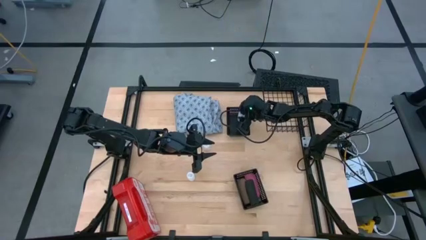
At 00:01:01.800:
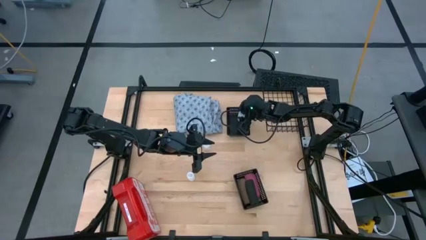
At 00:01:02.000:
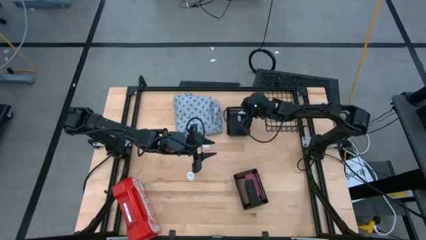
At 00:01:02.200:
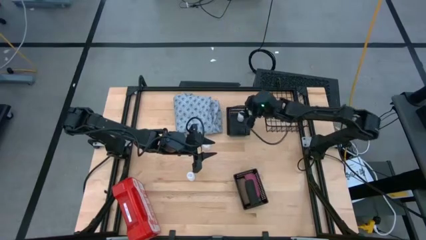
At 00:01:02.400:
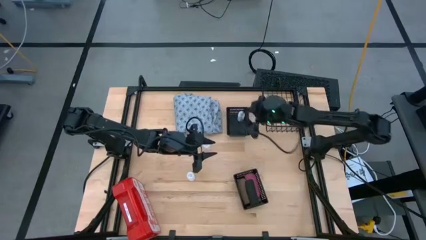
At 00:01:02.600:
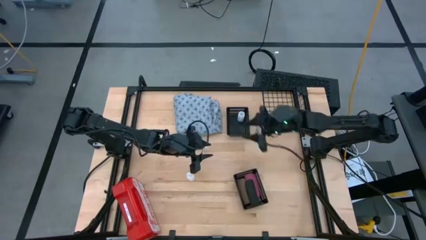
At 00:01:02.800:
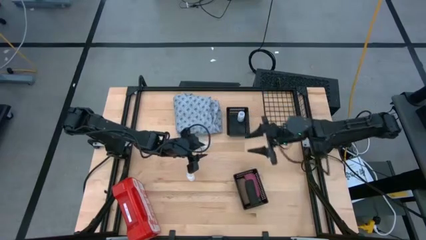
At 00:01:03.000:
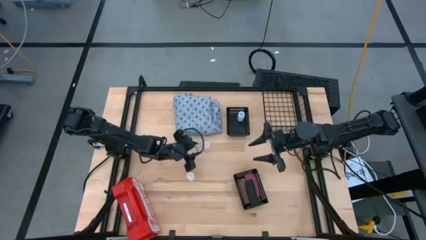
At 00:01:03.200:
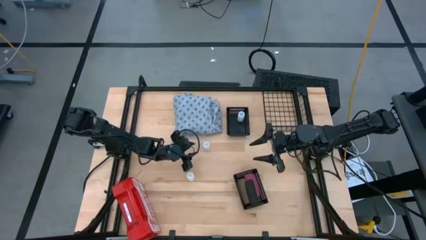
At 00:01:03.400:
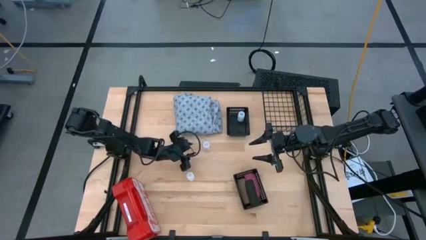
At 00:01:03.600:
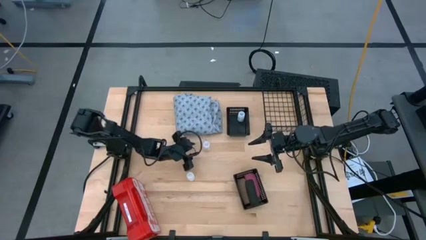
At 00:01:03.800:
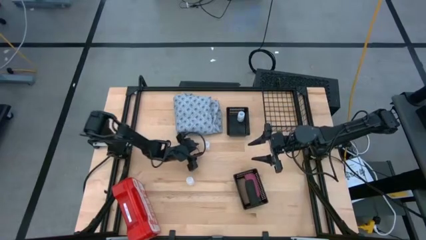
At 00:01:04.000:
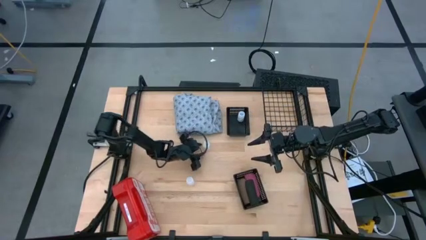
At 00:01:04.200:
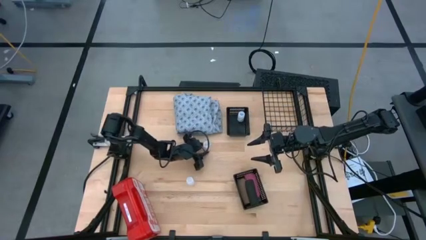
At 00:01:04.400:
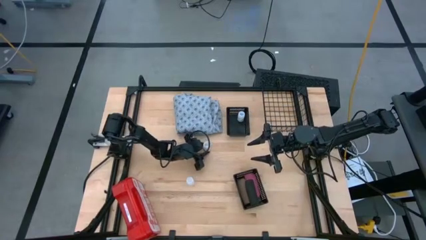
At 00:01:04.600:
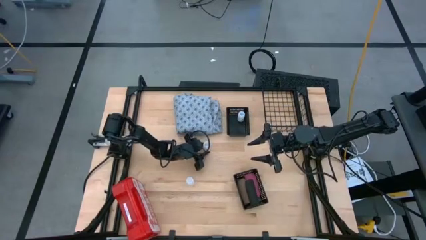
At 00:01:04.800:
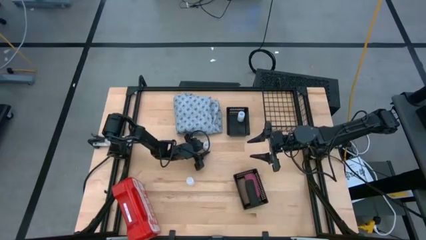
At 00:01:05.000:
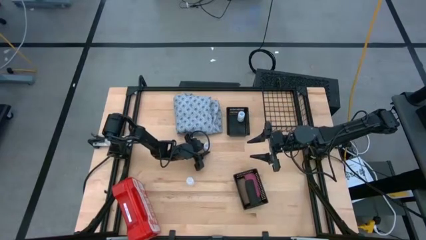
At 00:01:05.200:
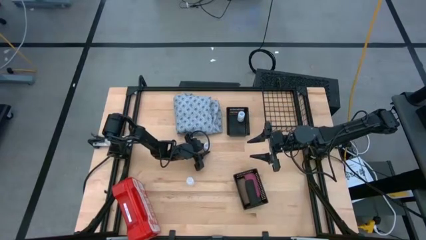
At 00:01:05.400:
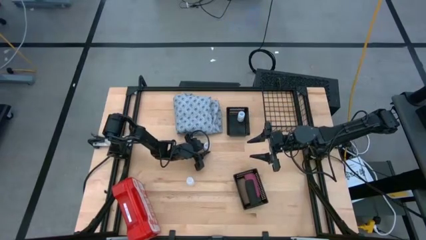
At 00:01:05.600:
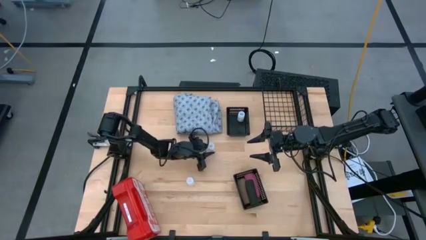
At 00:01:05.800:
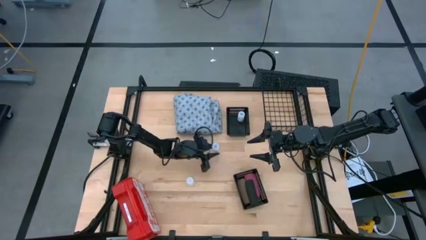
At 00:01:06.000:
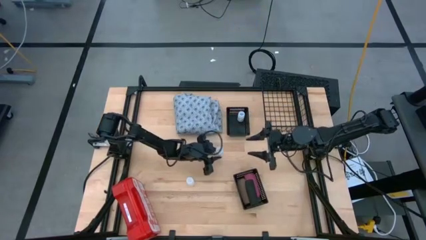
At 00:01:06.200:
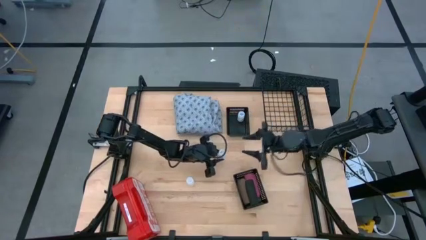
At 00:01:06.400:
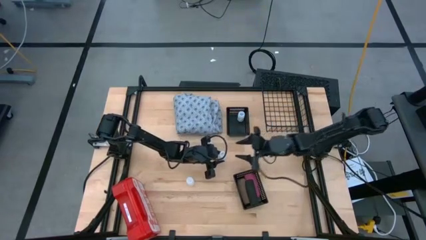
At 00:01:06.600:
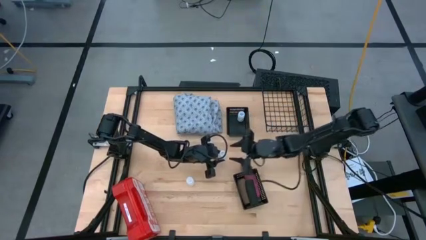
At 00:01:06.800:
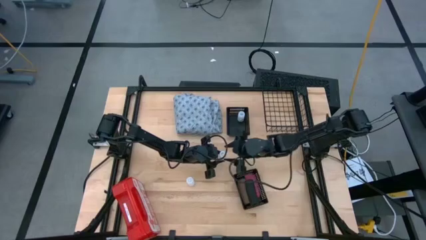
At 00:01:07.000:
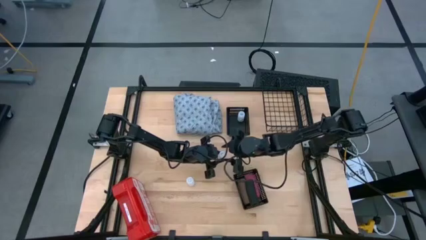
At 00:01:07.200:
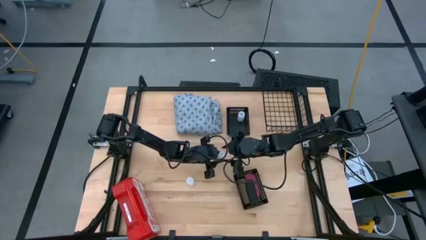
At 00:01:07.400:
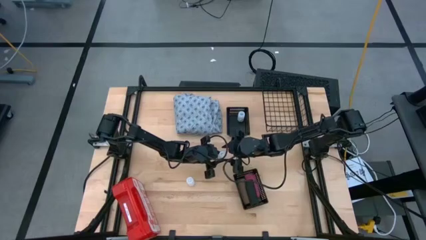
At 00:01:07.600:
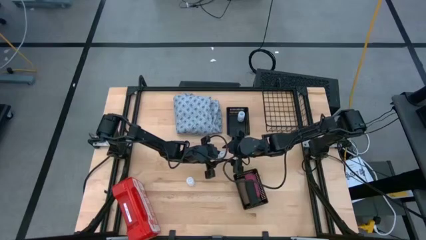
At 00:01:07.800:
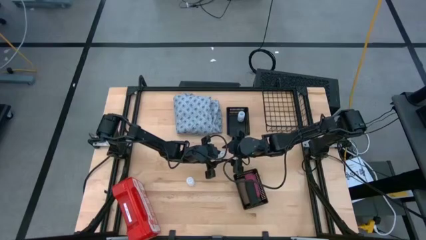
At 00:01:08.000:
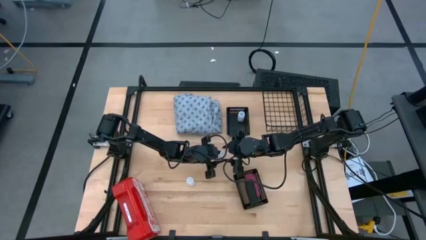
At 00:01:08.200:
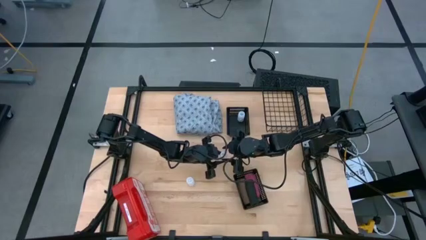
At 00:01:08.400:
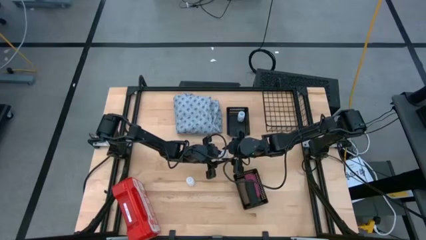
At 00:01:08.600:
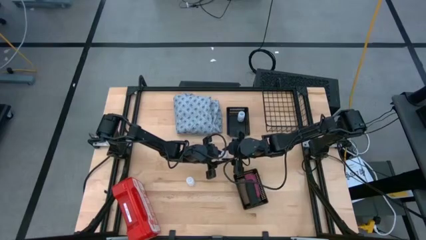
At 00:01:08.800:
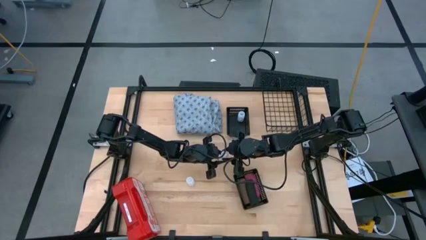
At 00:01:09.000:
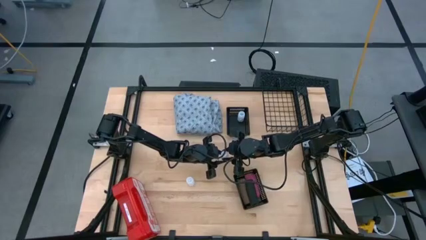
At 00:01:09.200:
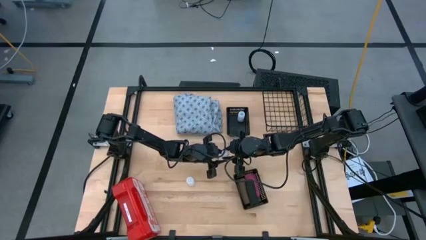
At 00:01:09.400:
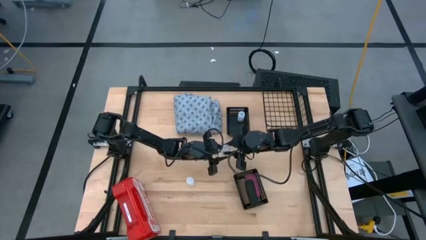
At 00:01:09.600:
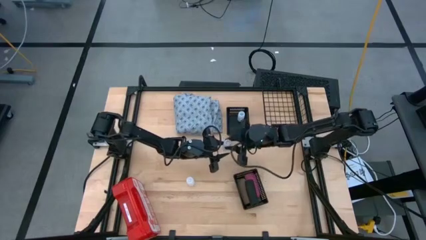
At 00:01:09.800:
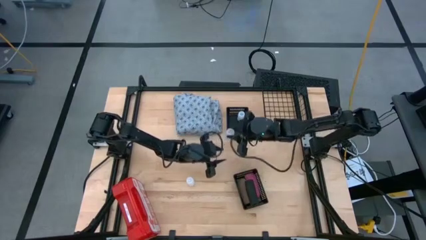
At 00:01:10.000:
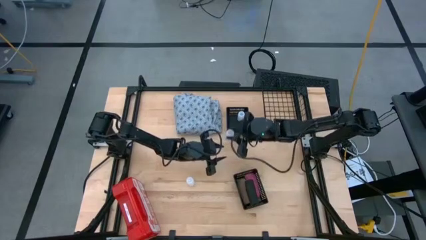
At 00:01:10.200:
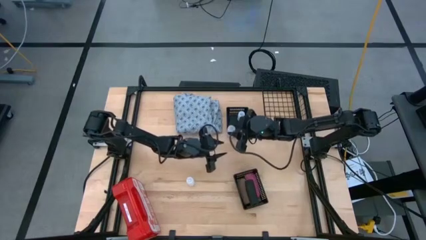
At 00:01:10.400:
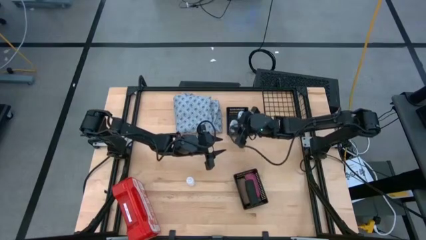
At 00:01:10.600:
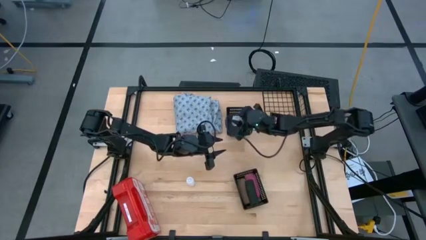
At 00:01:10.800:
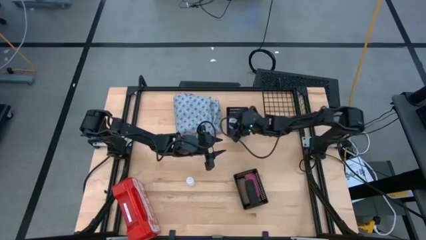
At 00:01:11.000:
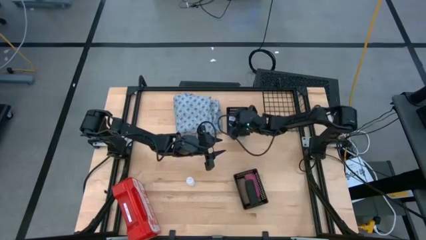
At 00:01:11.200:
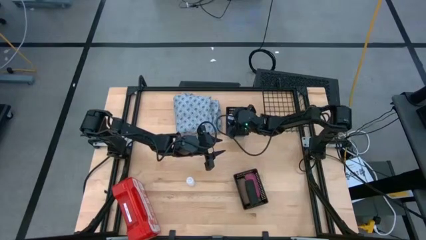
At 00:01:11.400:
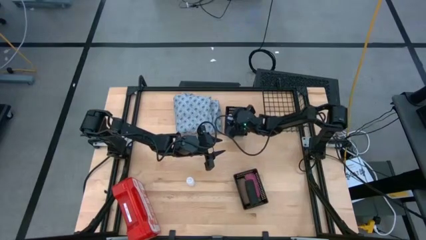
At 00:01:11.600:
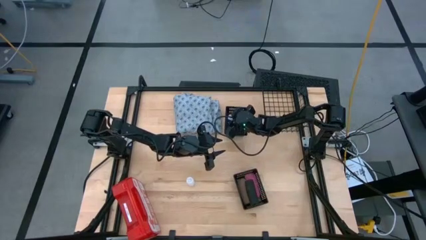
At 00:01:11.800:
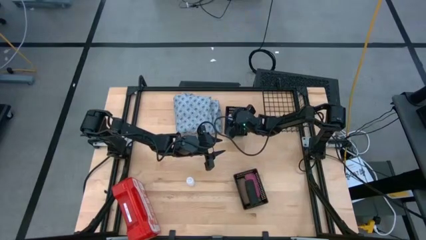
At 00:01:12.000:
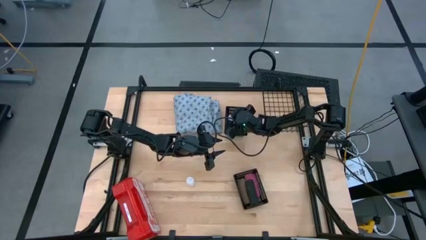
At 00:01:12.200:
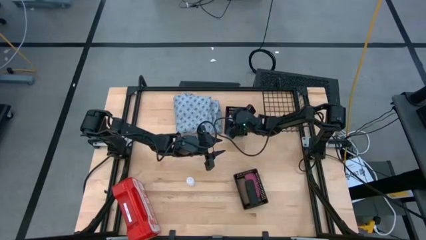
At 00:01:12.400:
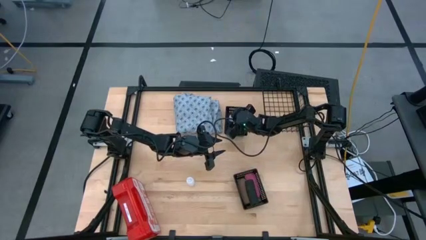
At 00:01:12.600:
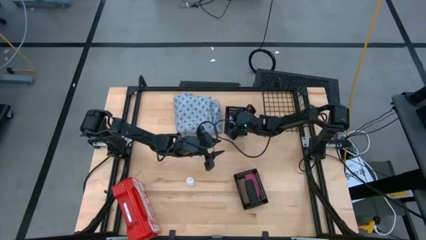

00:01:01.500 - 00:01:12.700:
Task: Pick & Place Medicine items
Put the top transparent pill bottle into the top black basket
